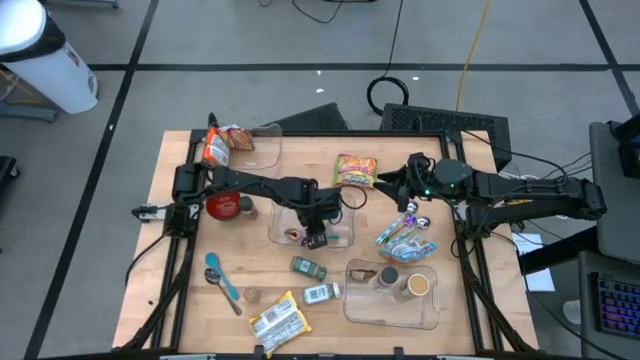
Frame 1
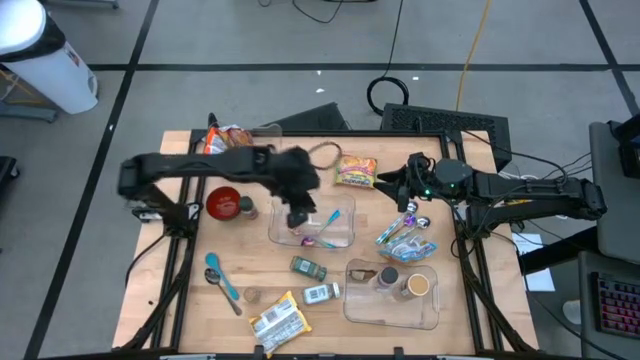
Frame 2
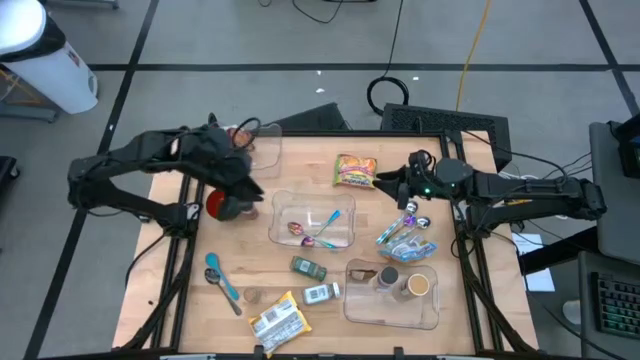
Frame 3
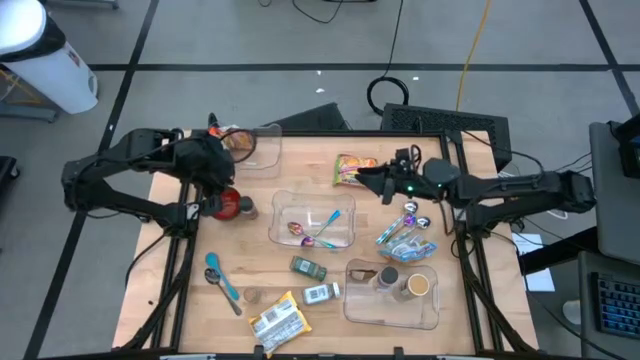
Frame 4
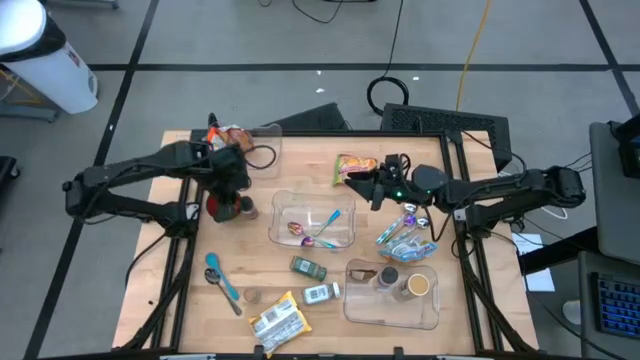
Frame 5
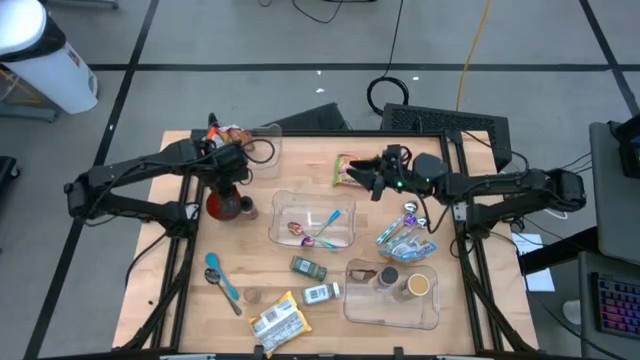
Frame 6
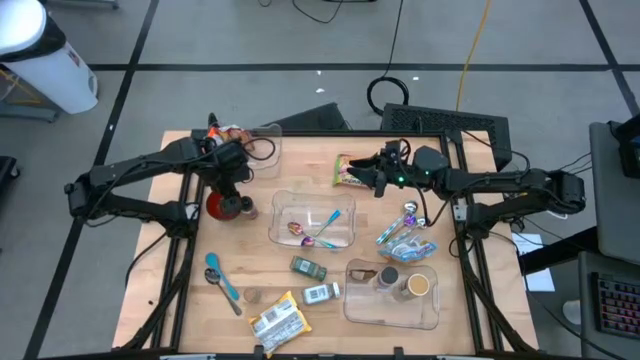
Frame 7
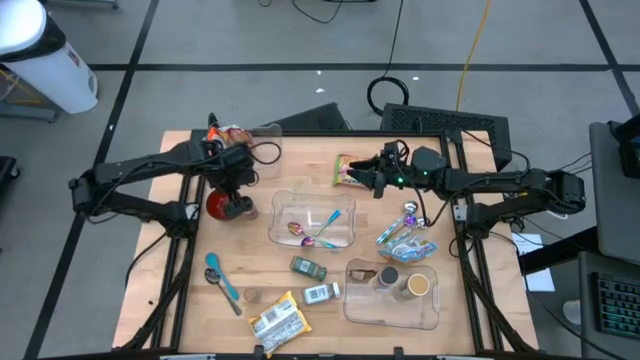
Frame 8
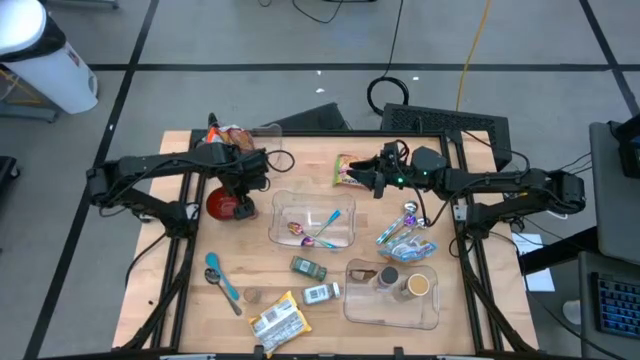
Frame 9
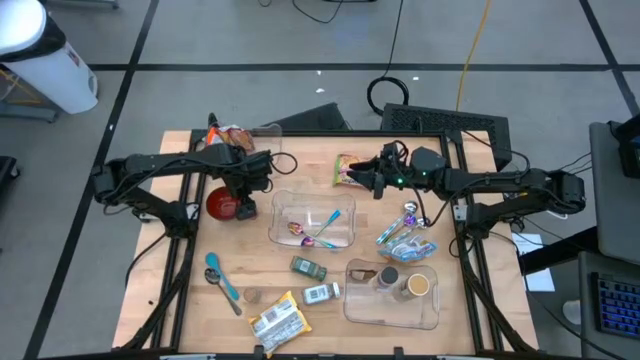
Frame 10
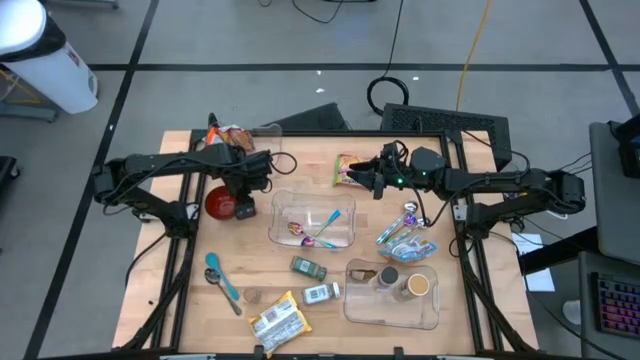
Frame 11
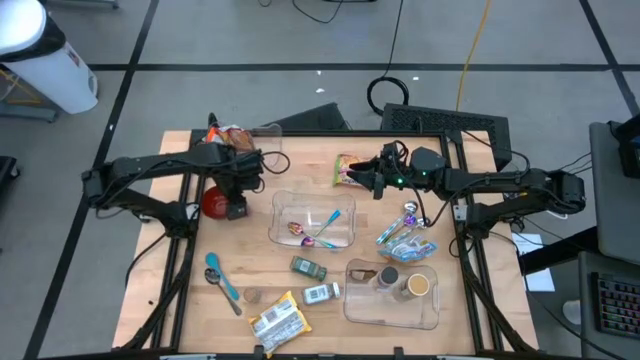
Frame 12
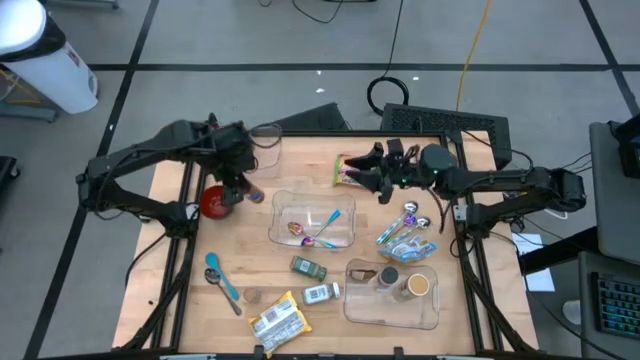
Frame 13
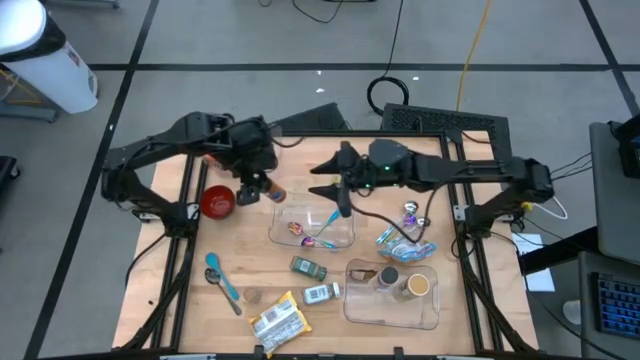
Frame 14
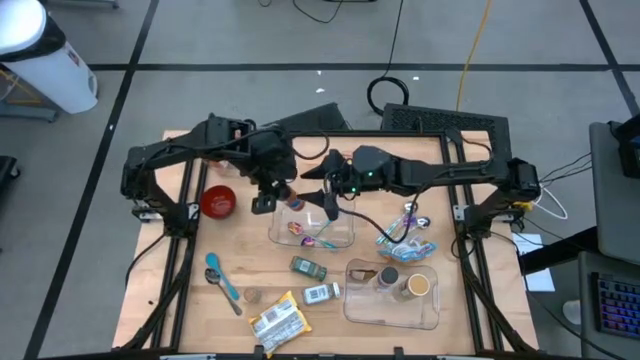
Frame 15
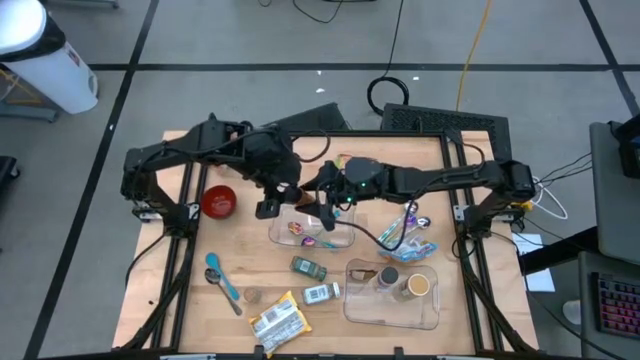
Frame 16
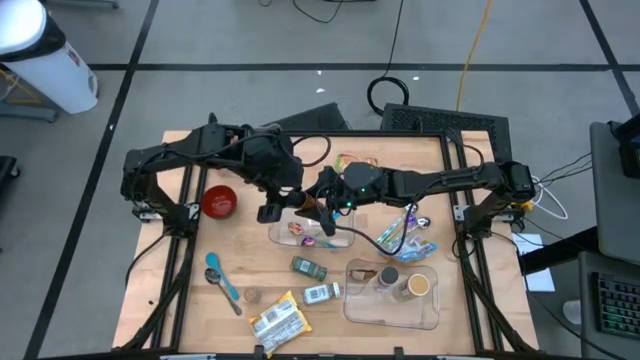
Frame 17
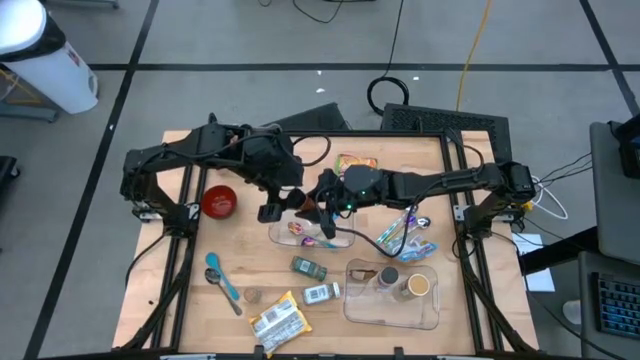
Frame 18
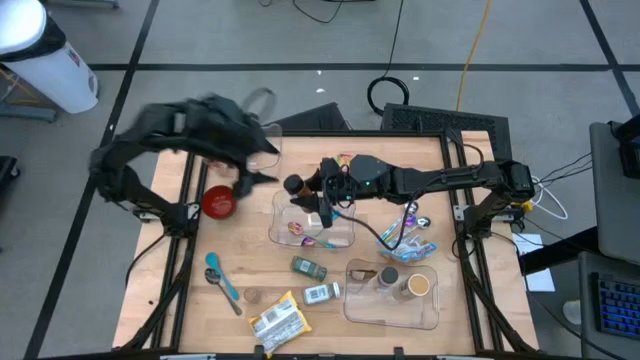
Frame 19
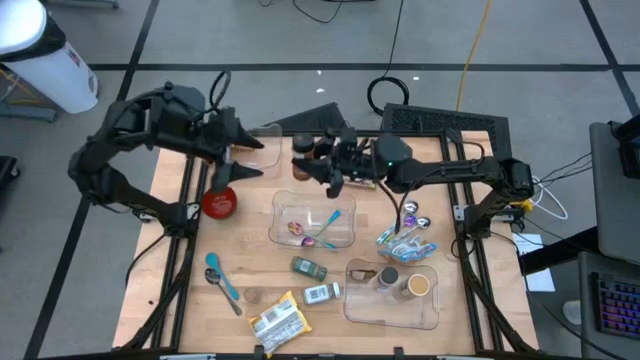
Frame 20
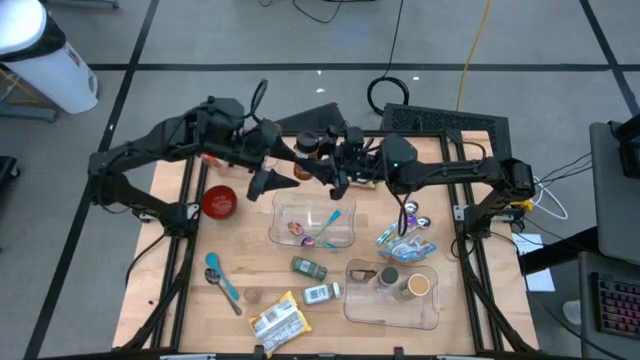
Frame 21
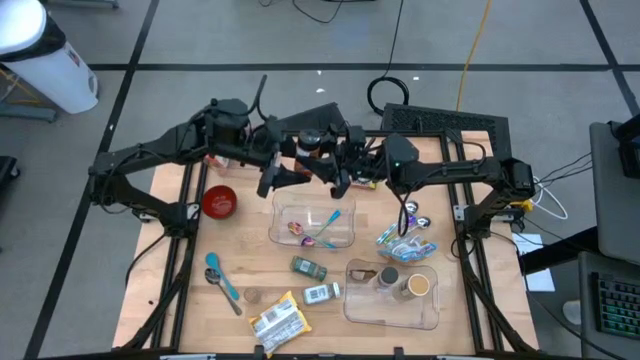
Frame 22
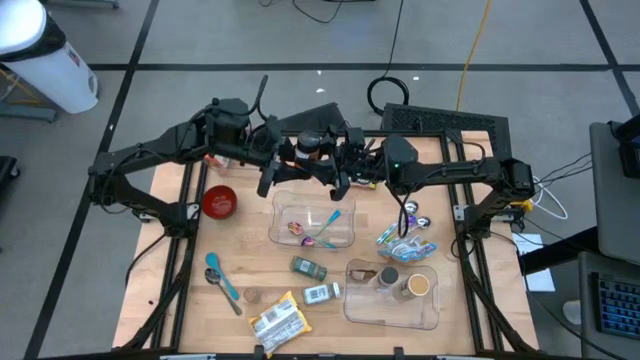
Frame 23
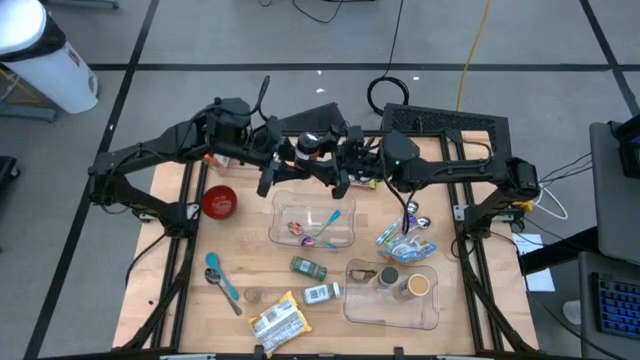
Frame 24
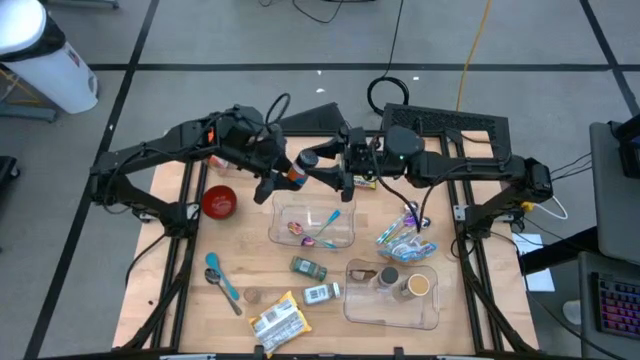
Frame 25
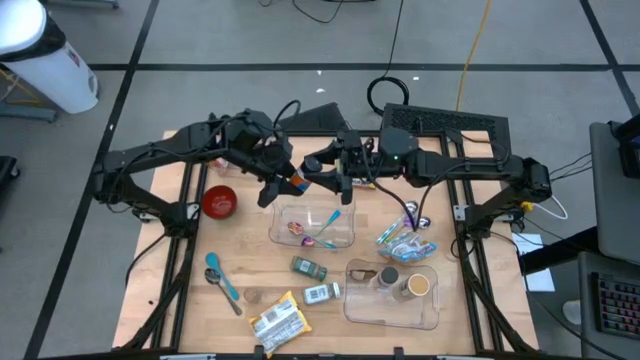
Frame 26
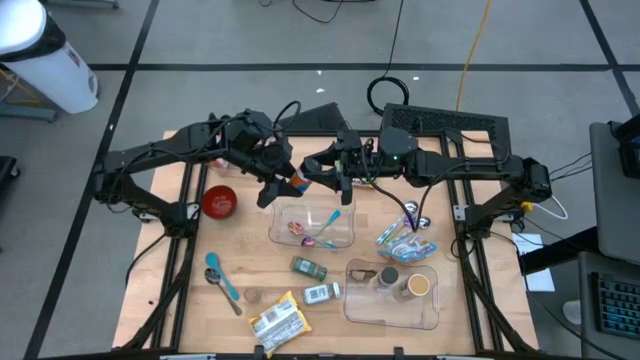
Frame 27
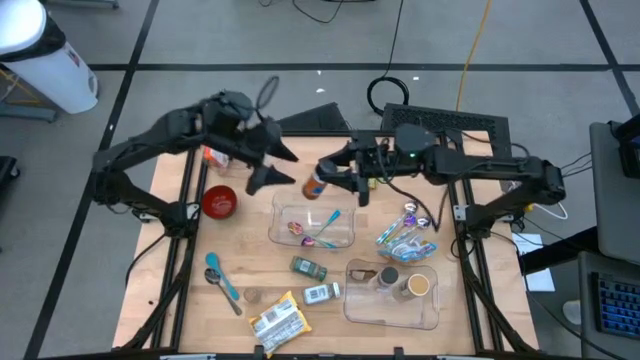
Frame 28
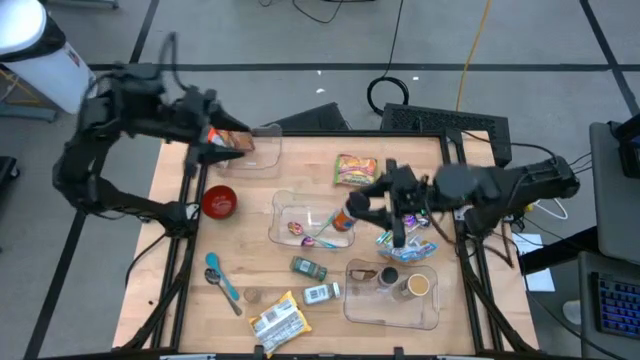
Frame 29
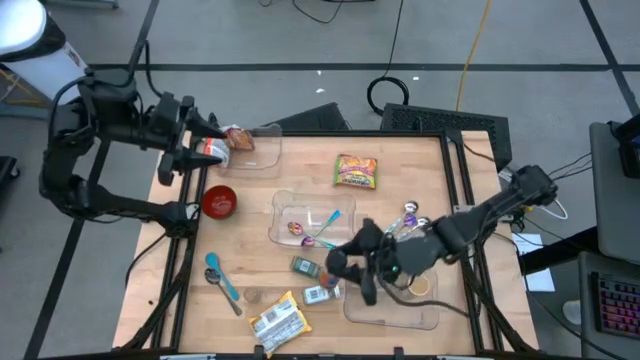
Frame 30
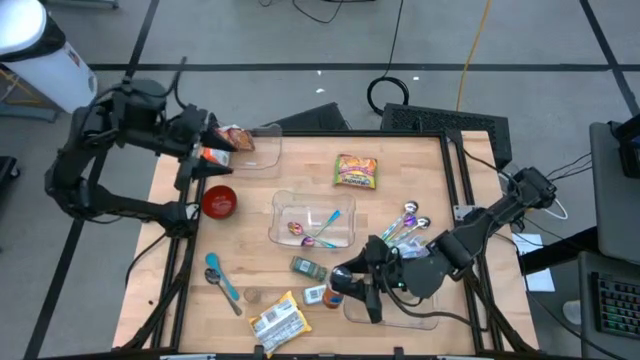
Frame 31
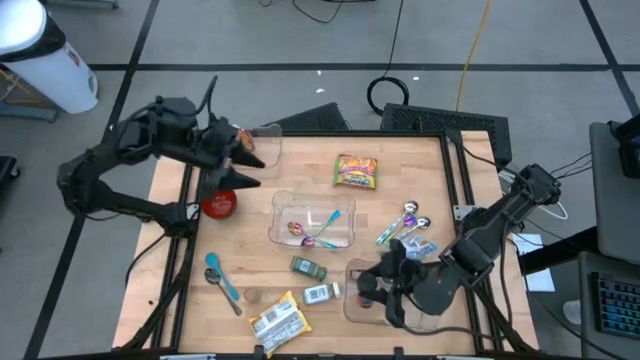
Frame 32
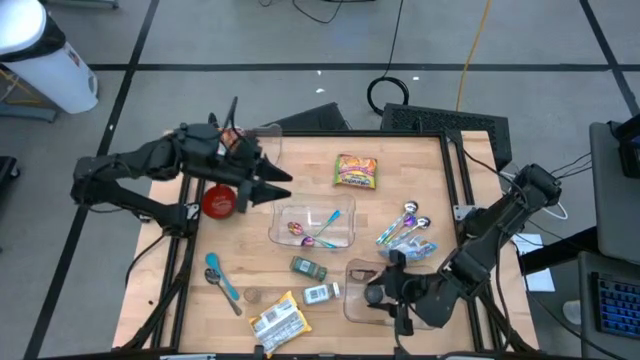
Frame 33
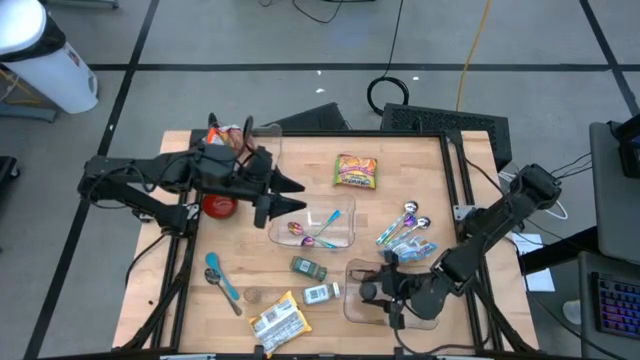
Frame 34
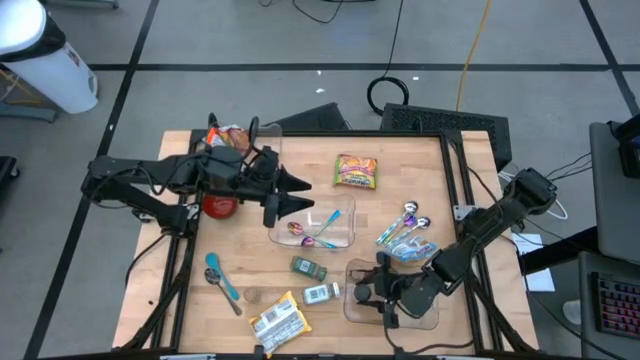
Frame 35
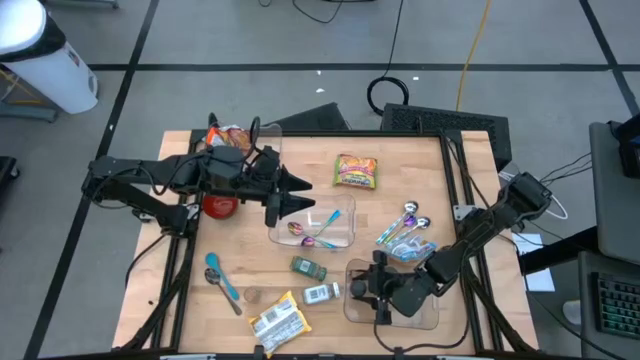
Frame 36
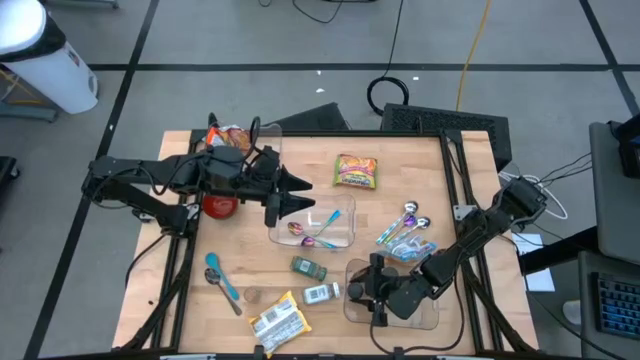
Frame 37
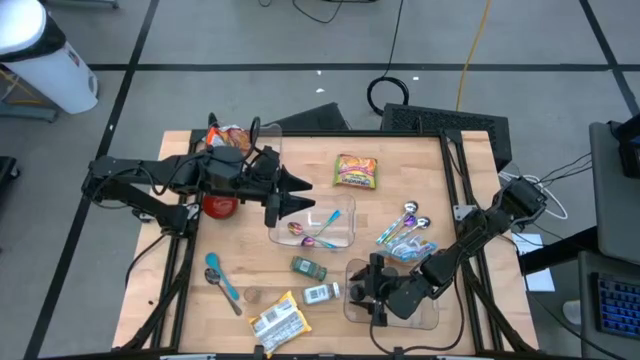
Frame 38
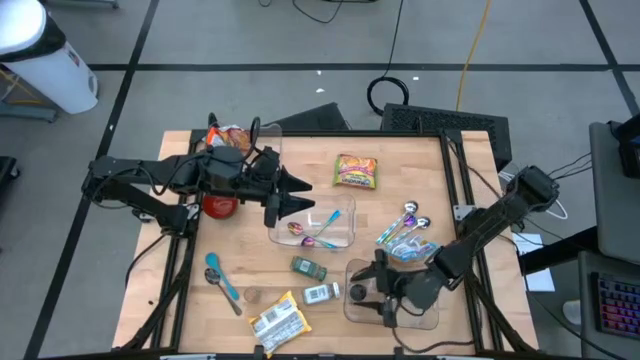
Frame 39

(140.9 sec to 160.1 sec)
Task: Pick & Place Food Item
Put the orange seasoning bottle into the bottom transparent bin

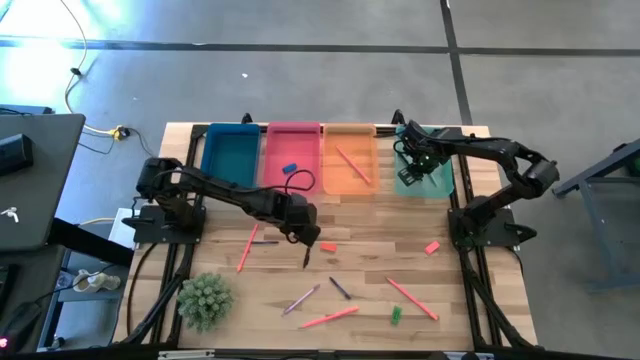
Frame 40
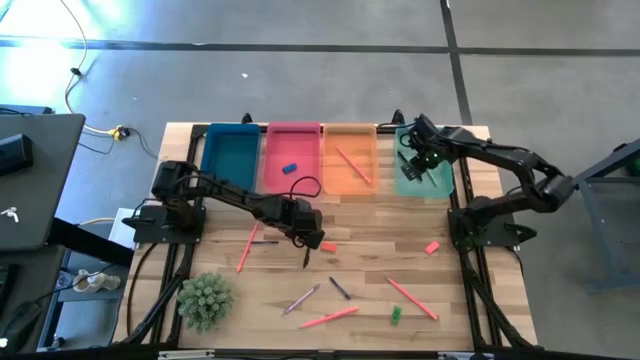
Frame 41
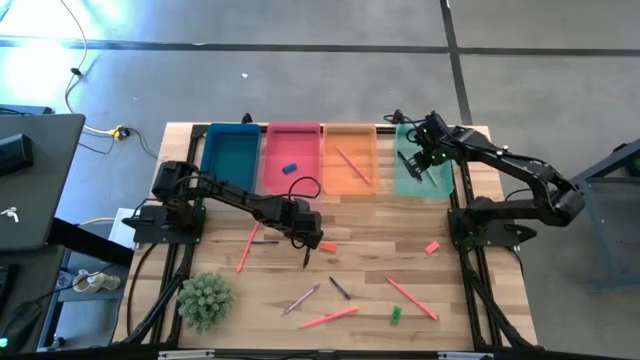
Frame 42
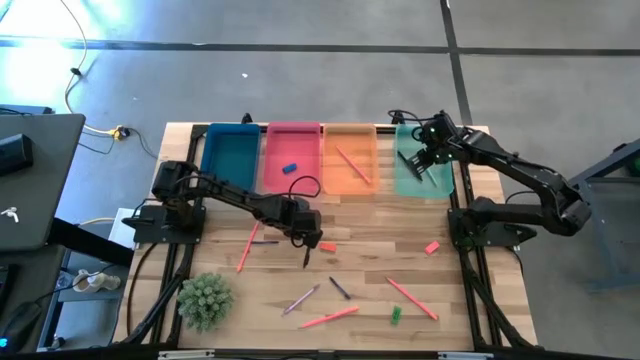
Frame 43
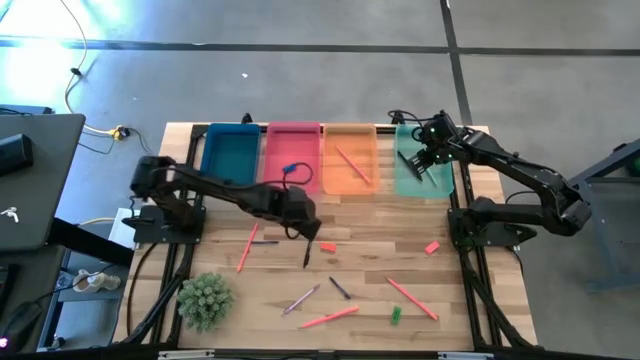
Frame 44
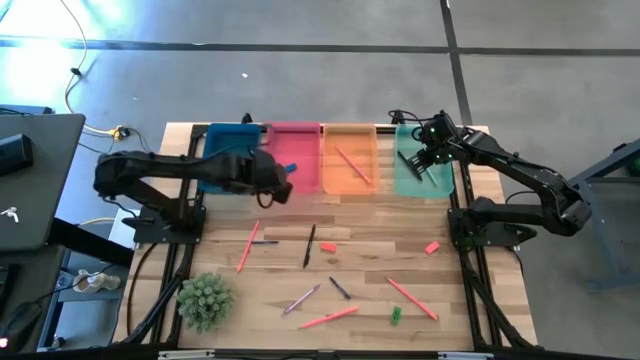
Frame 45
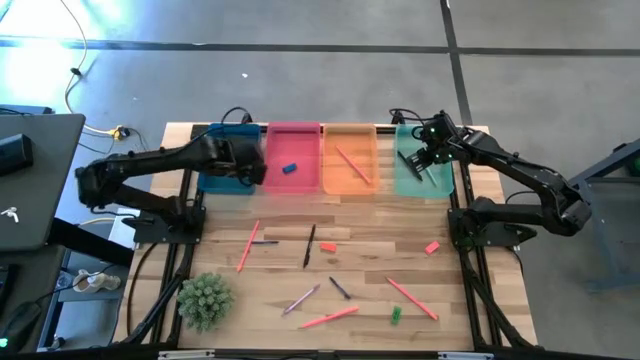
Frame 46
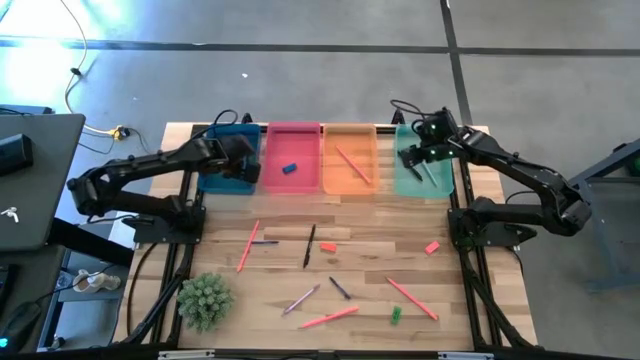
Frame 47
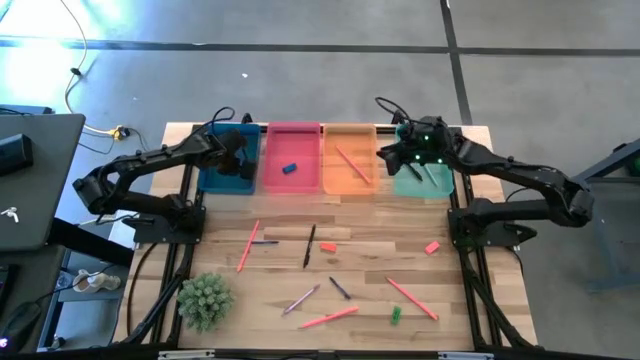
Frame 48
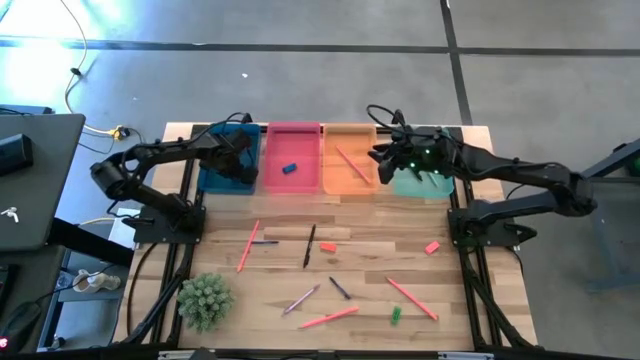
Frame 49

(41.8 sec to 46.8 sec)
Task: Sort crayons/erasers/pens/pencils in bins
Put the blue crayon into the blue bin
